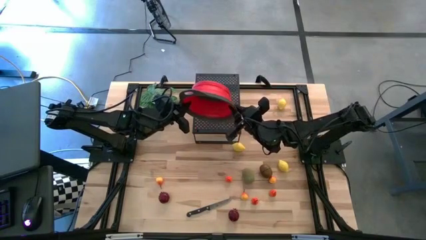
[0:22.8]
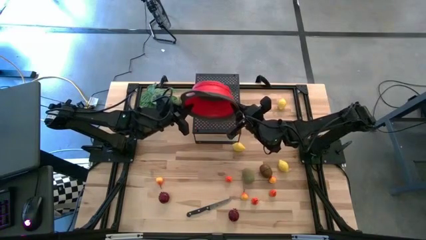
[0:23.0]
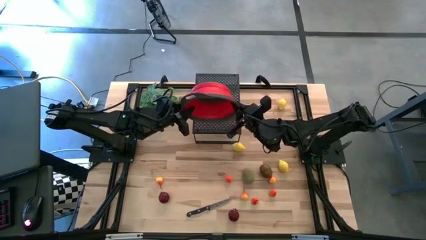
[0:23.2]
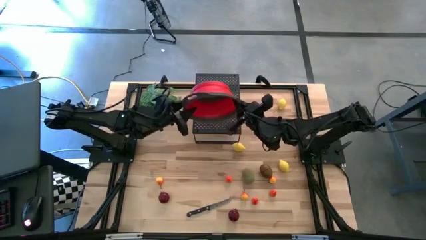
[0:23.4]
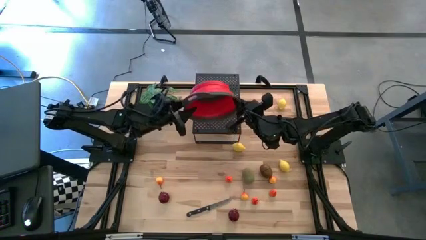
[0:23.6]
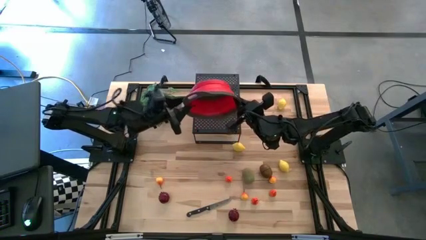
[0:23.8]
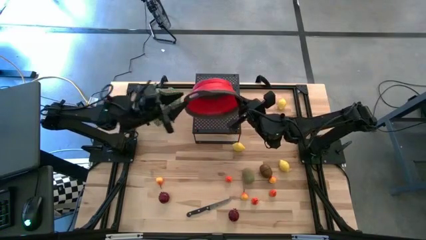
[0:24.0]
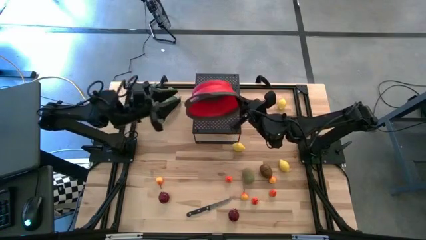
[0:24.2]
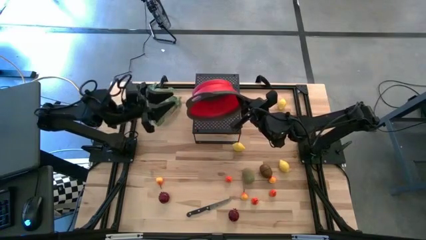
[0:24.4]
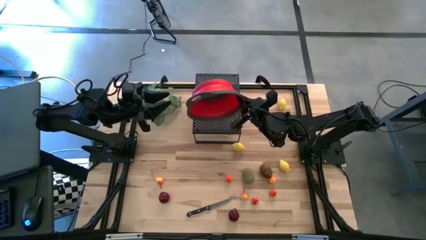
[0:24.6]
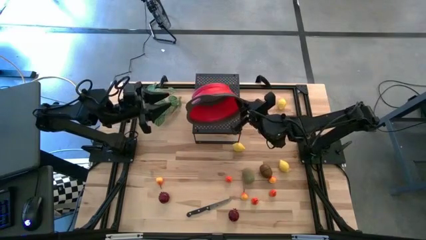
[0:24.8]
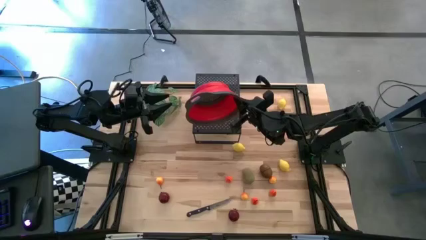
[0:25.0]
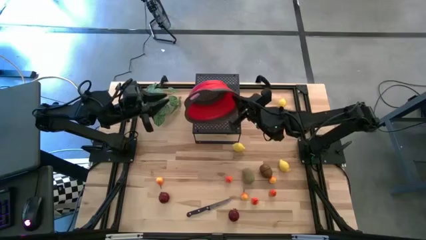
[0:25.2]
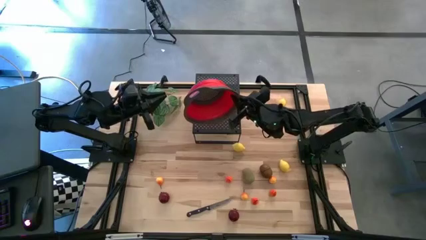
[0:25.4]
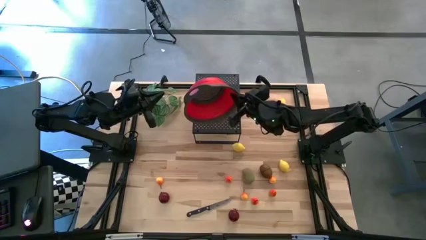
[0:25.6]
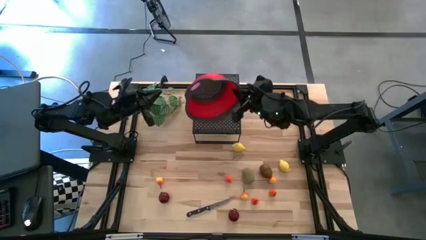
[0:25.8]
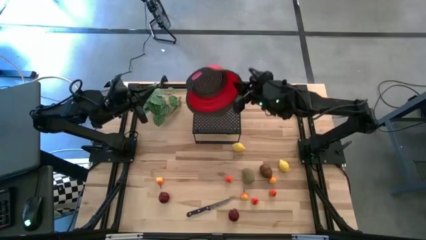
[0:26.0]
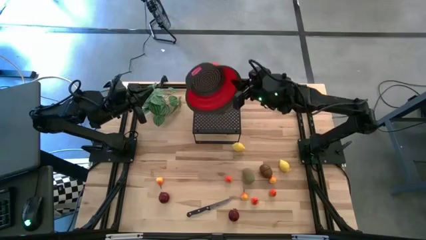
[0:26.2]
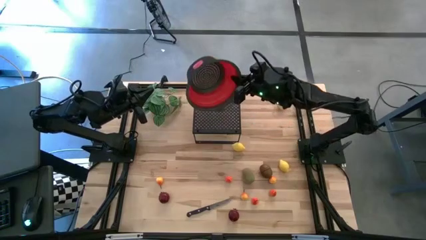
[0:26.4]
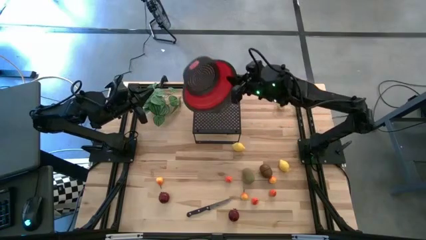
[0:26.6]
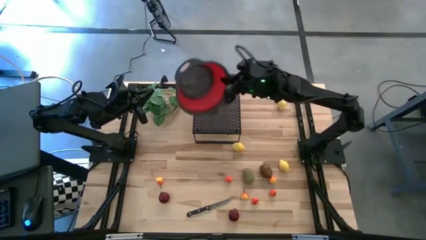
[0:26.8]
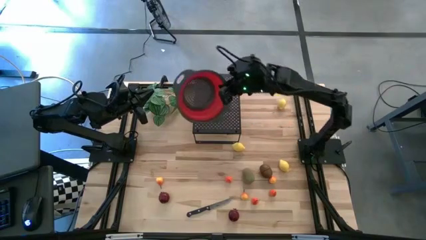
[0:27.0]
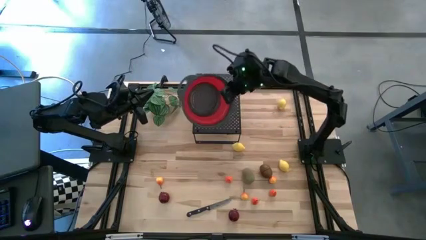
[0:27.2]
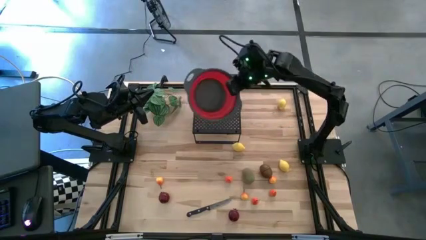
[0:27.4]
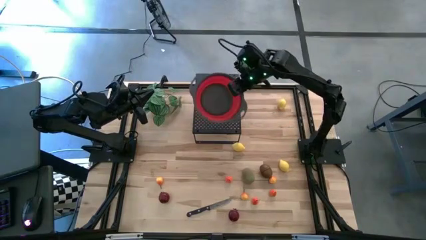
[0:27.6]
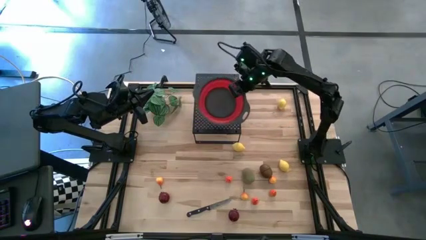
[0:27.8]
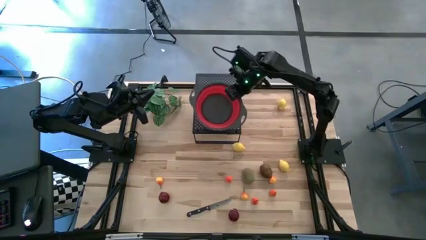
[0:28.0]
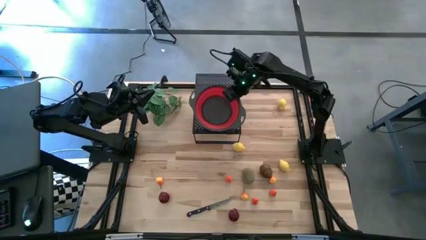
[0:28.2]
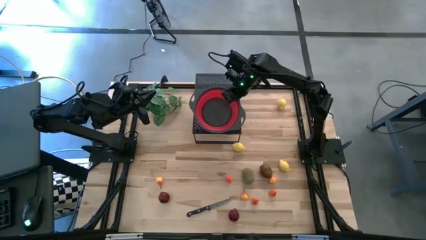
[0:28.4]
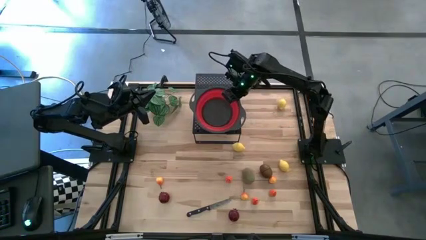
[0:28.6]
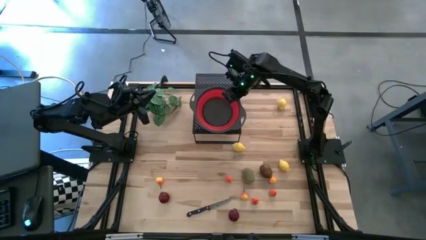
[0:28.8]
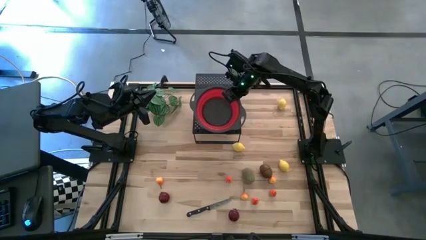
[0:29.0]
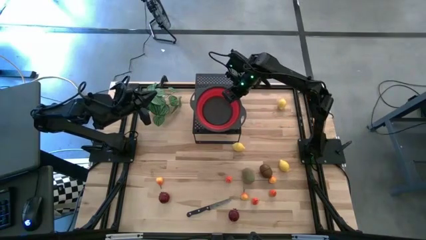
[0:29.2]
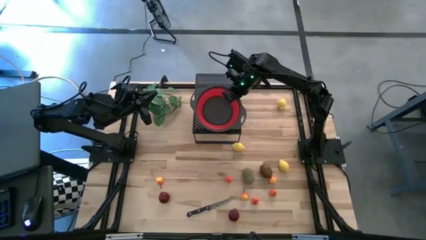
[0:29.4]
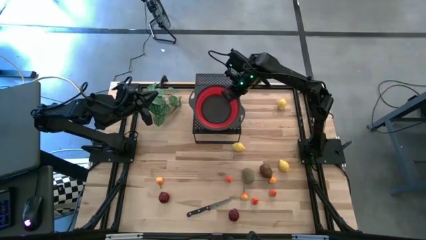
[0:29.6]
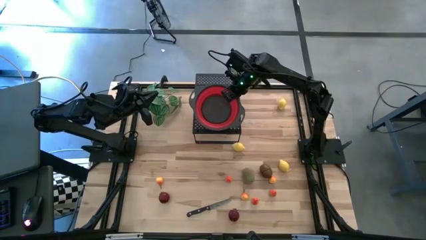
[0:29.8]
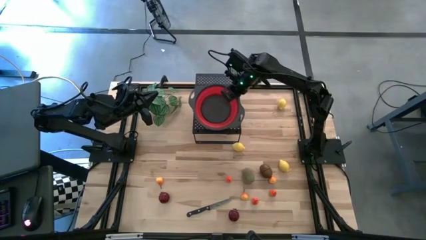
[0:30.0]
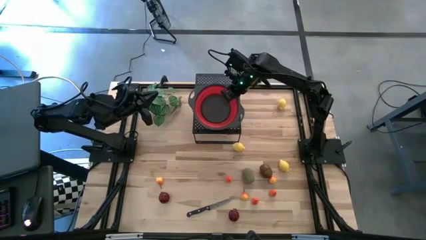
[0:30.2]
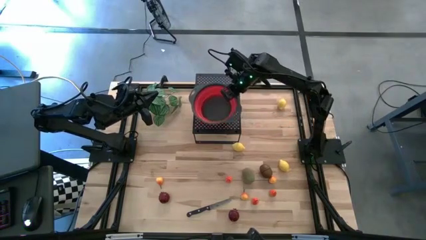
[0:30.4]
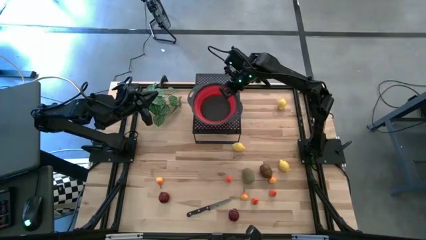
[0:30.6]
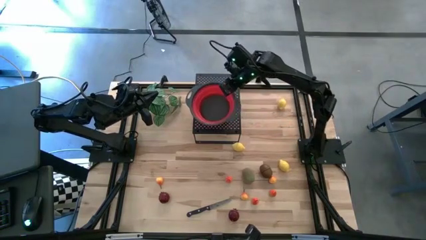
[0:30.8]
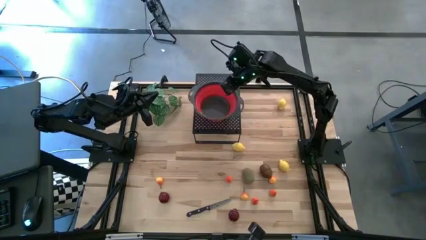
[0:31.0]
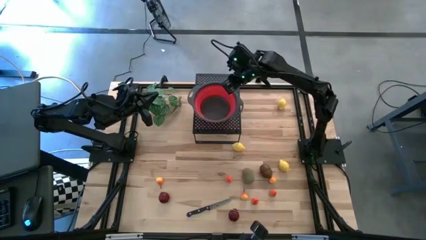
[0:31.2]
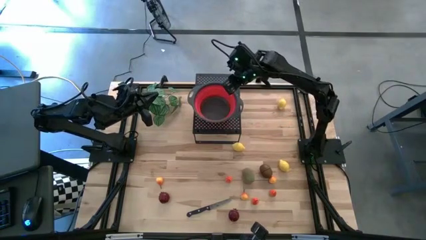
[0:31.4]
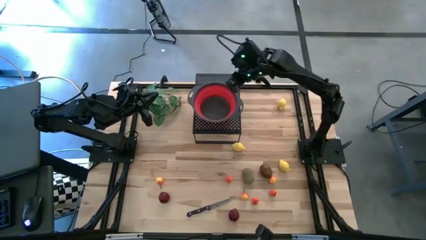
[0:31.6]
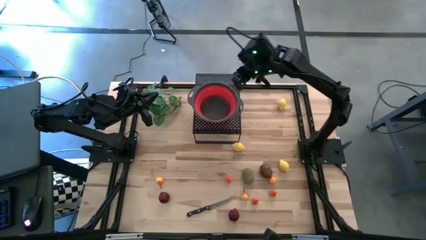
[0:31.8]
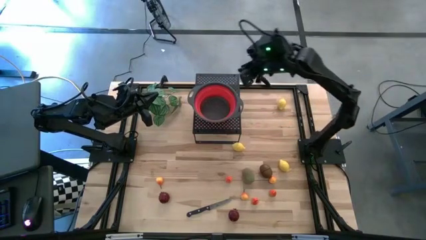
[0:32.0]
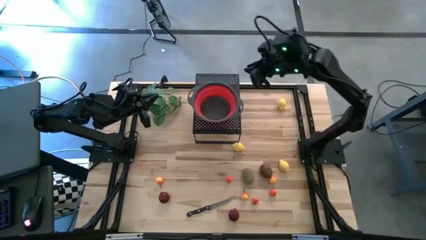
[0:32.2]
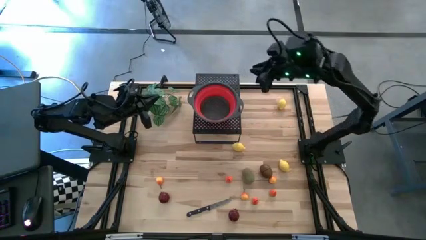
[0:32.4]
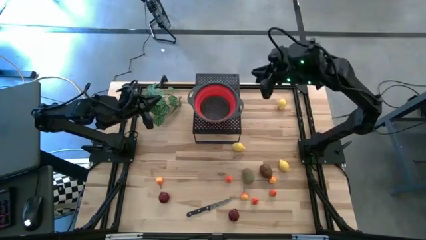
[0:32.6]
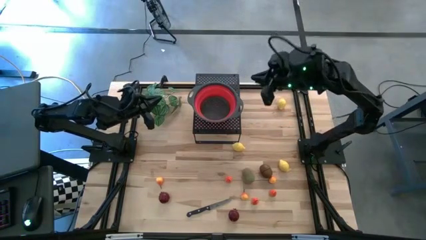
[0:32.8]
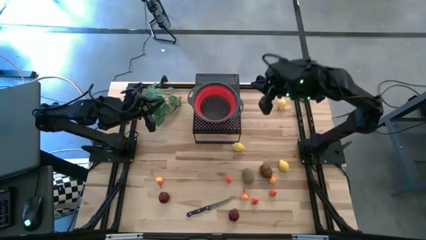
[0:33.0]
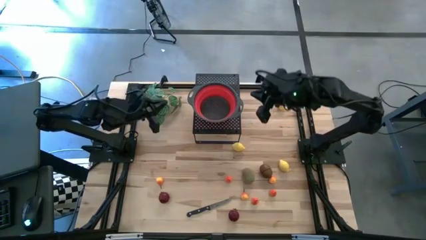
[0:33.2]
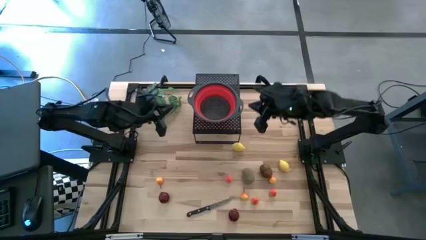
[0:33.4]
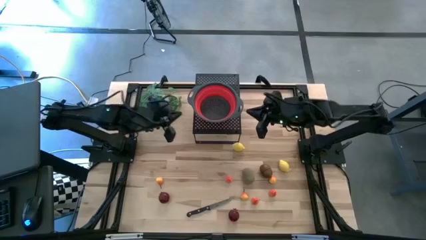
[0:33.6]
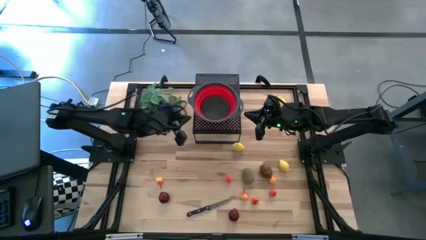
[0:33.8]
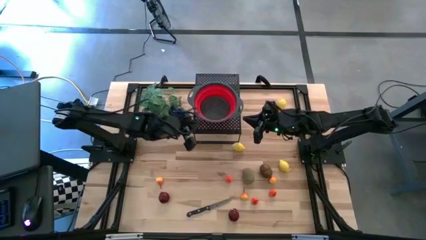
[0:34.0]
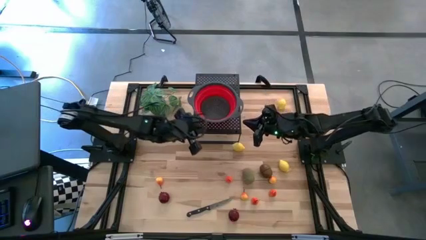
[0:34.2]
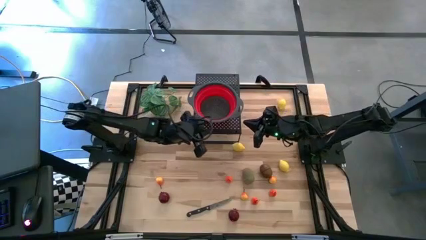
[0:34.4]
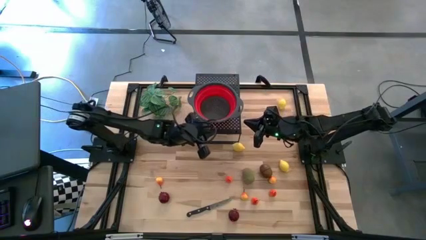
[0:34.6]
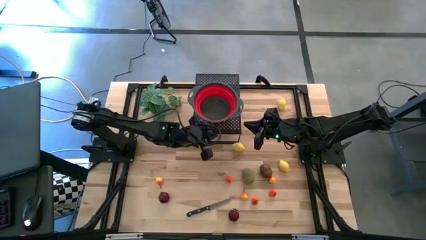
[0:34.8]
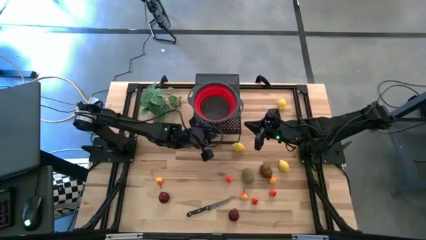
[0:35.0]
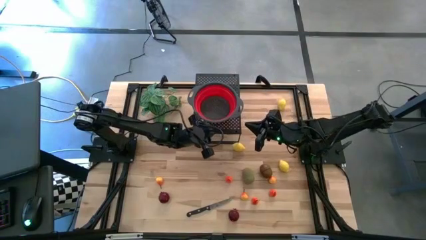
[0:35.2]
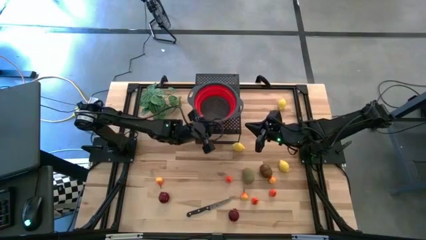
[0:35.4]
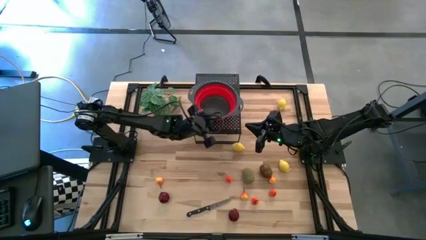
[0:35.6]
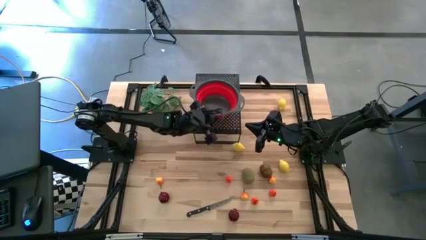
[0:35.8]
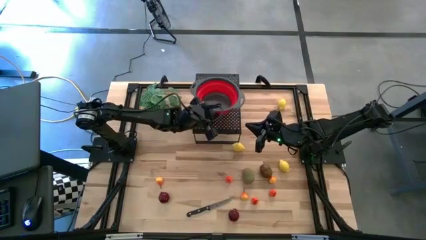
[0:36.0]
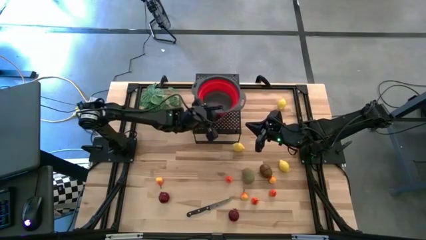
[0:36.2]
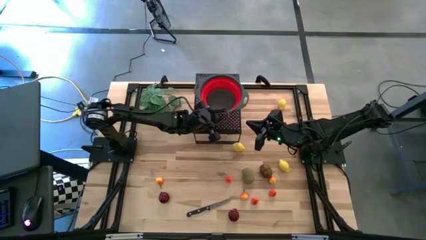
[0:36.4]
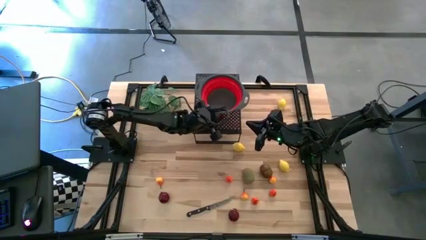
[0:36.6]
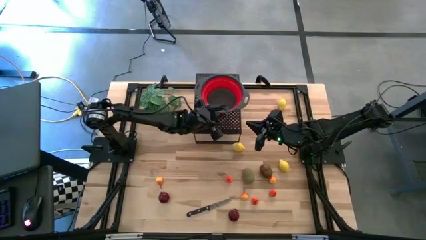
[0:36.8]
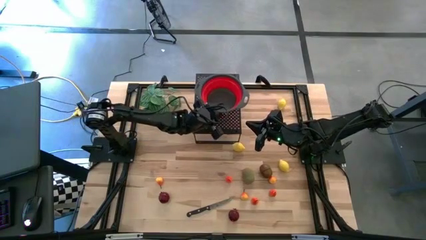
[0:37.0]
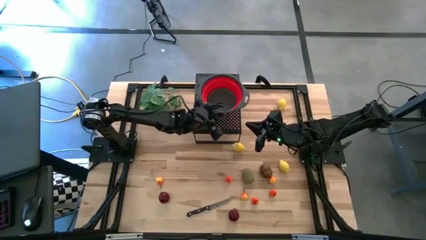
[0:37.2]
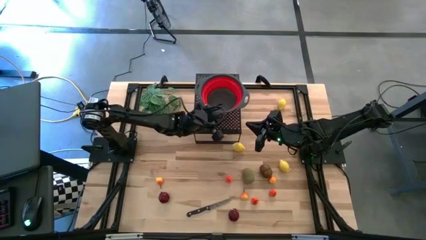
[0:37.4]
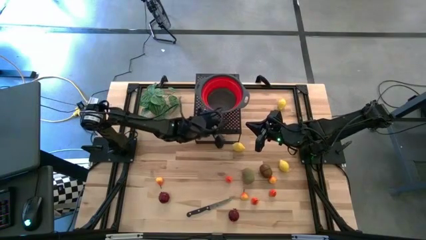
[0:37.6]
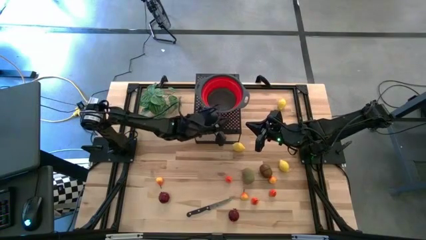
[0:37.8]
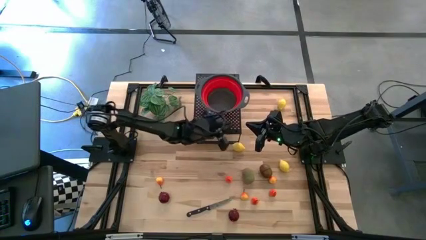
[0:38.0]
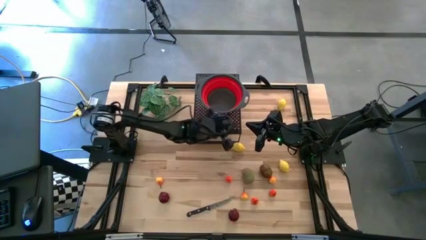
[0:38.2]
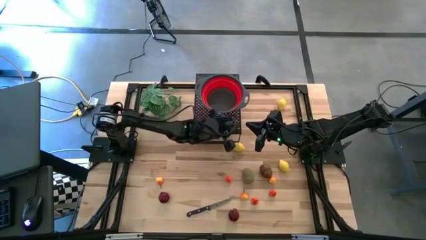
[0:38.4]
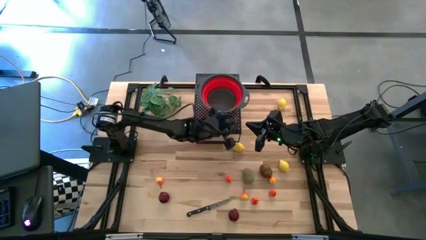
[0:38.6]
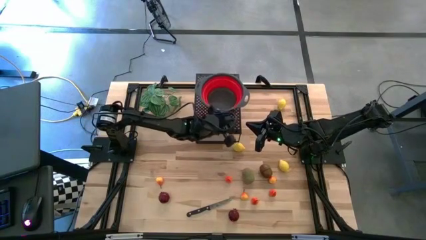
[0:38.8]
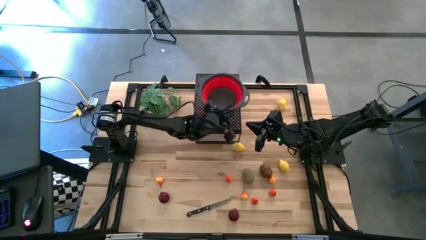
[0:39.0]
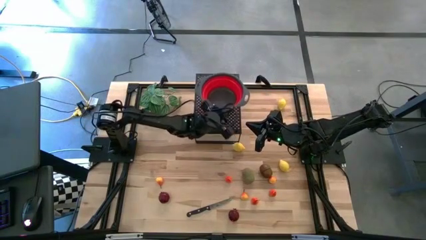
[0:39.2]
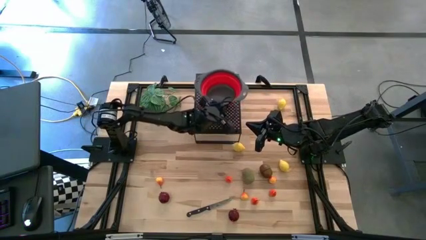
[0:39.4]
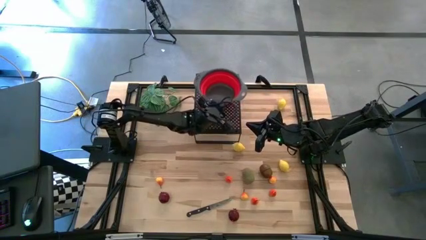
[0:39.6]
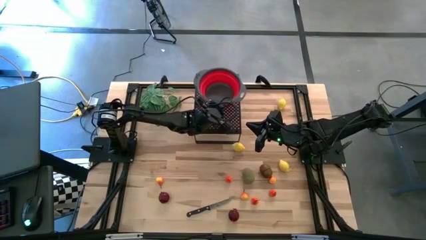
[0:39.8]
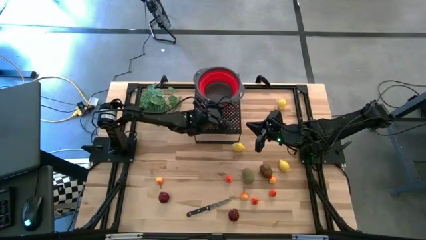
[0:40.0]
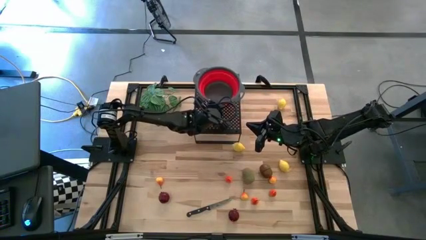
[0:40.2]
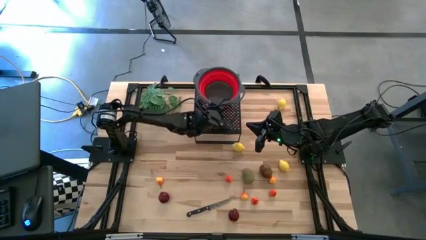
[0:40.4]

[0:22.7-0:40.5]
Task: Pick & Place Fruit
Put the red strainer bowl on the shelf
